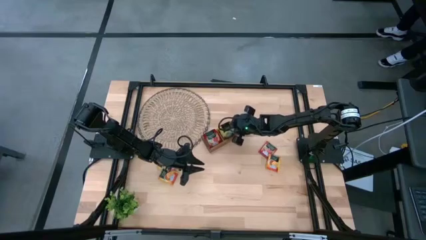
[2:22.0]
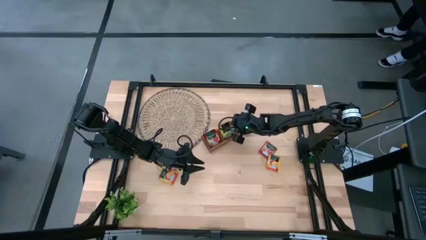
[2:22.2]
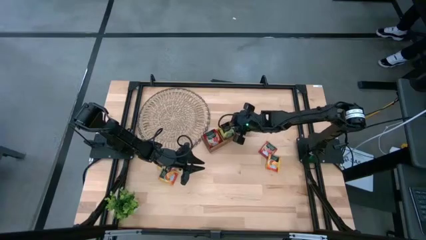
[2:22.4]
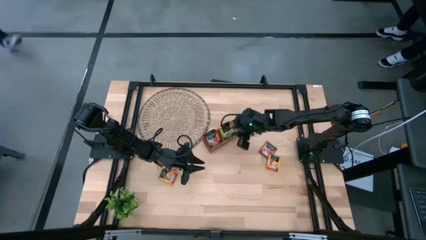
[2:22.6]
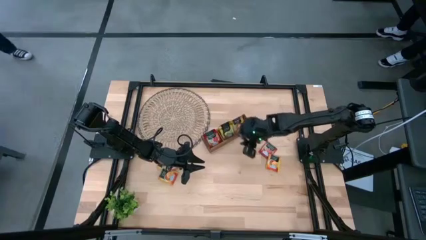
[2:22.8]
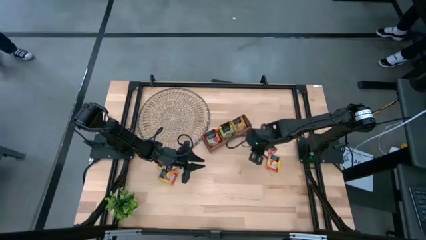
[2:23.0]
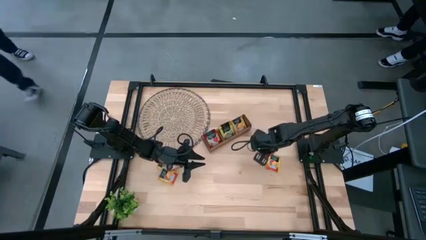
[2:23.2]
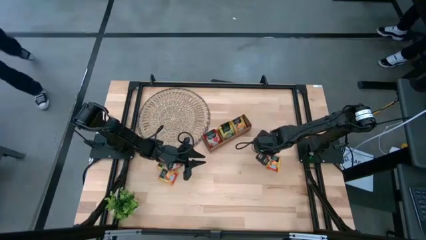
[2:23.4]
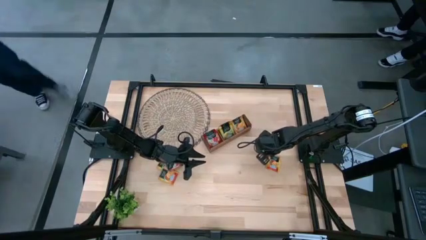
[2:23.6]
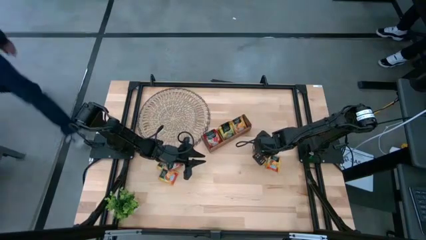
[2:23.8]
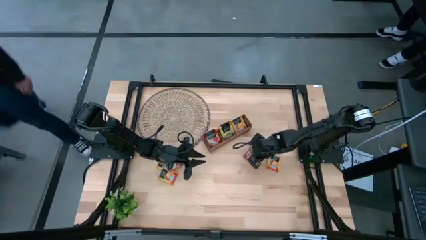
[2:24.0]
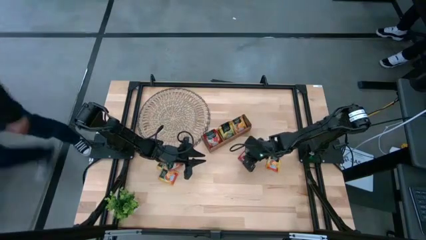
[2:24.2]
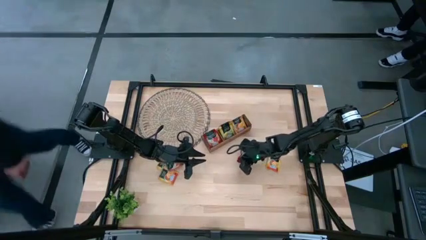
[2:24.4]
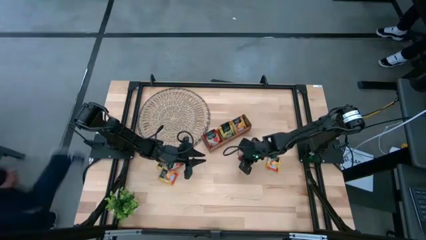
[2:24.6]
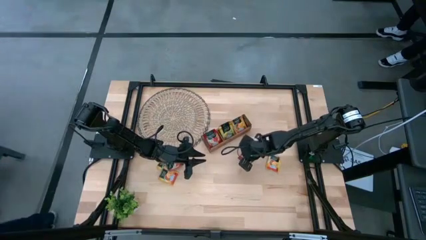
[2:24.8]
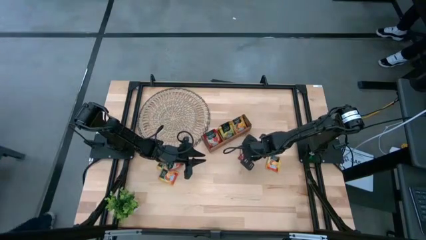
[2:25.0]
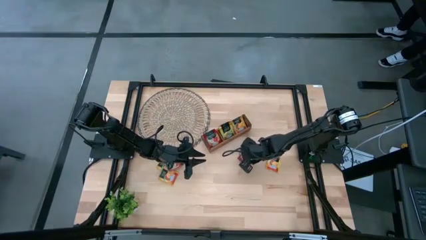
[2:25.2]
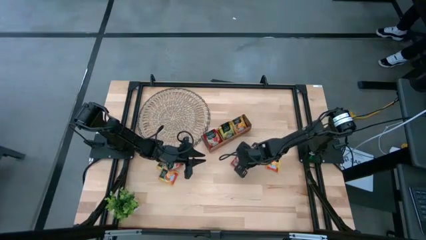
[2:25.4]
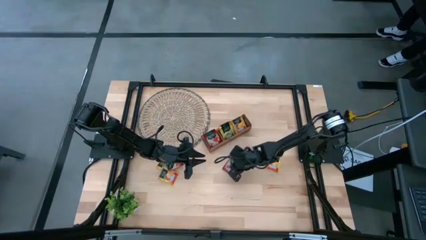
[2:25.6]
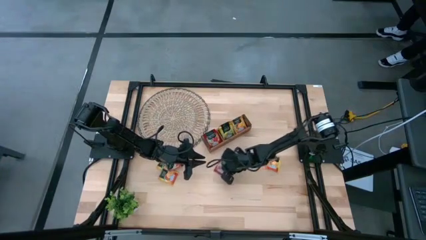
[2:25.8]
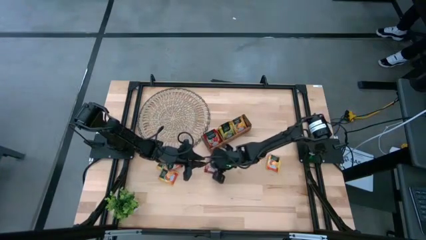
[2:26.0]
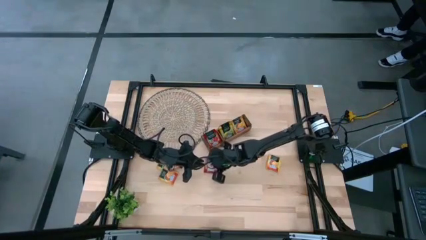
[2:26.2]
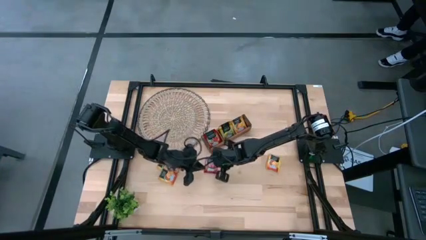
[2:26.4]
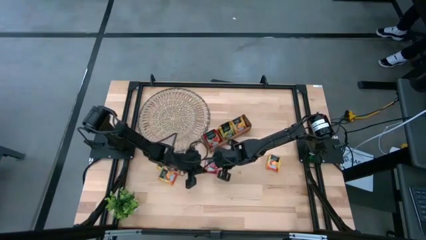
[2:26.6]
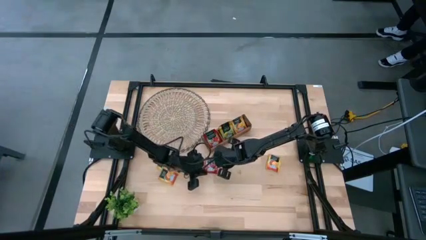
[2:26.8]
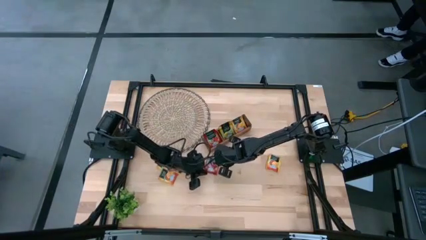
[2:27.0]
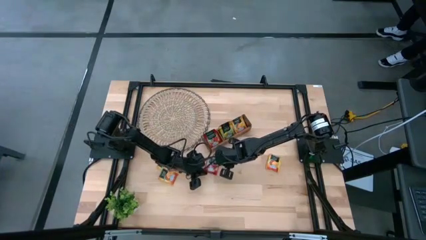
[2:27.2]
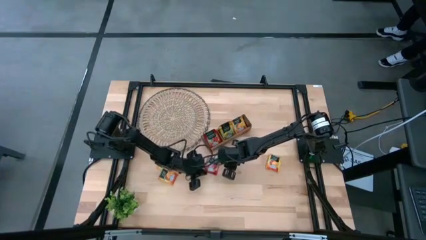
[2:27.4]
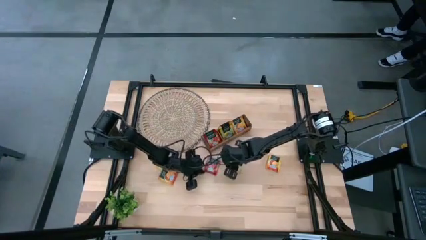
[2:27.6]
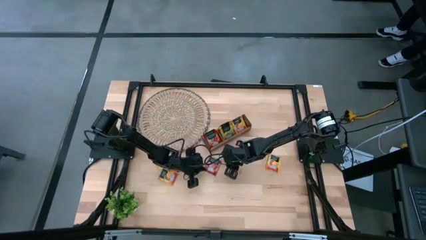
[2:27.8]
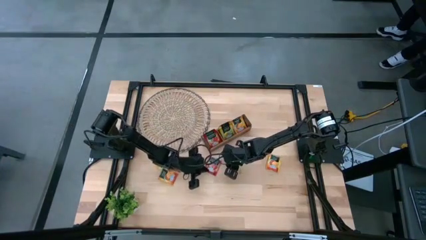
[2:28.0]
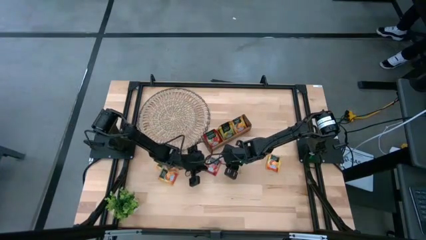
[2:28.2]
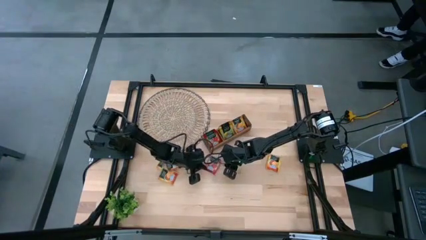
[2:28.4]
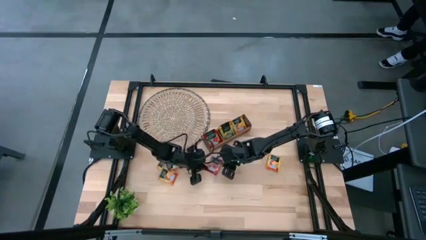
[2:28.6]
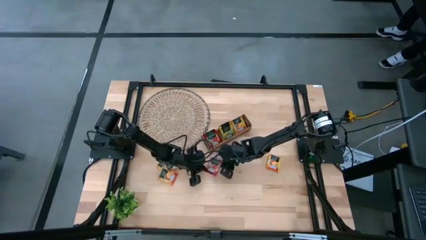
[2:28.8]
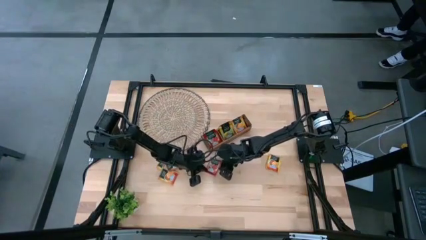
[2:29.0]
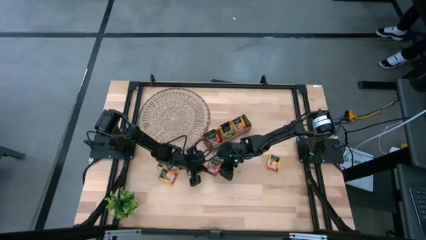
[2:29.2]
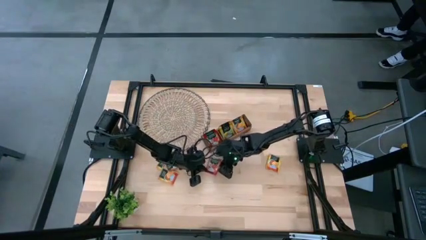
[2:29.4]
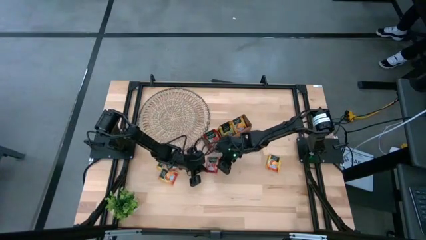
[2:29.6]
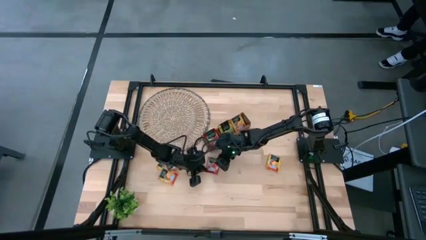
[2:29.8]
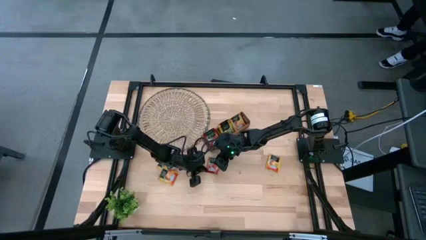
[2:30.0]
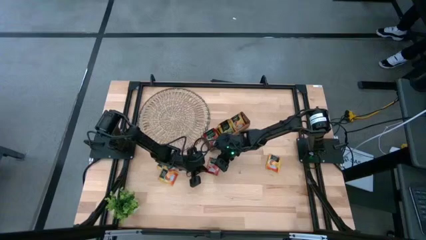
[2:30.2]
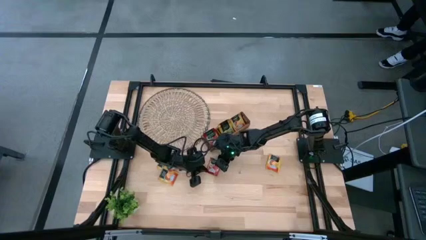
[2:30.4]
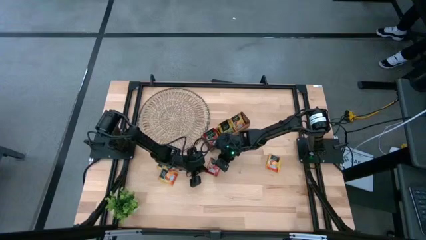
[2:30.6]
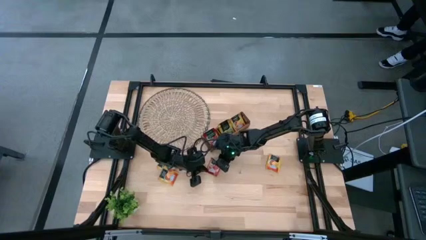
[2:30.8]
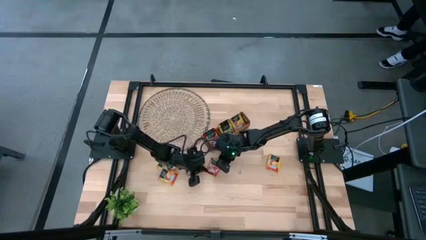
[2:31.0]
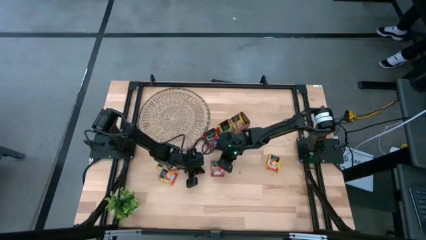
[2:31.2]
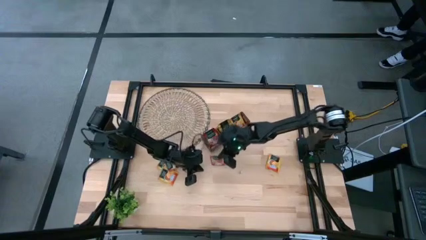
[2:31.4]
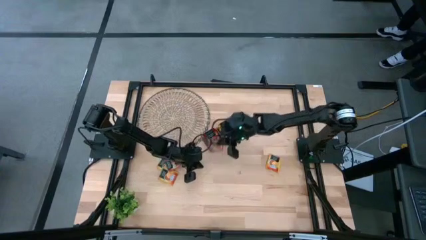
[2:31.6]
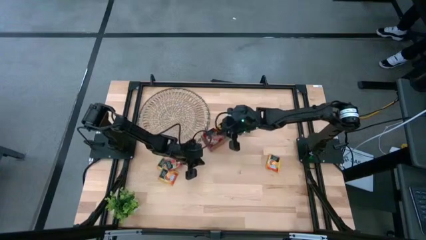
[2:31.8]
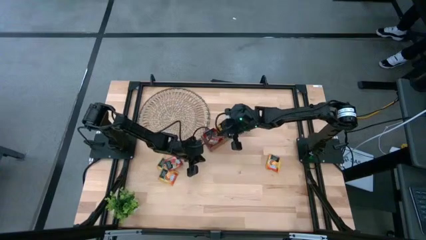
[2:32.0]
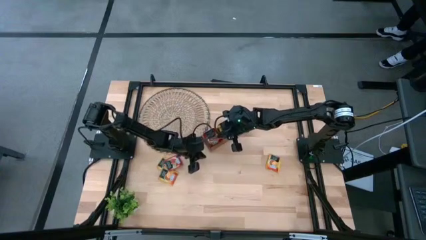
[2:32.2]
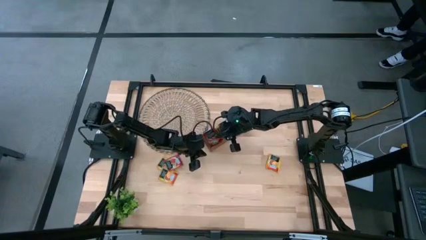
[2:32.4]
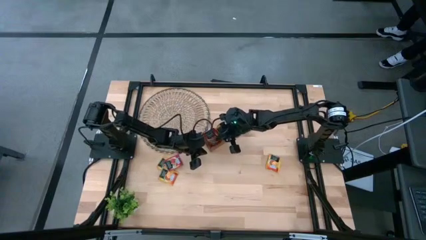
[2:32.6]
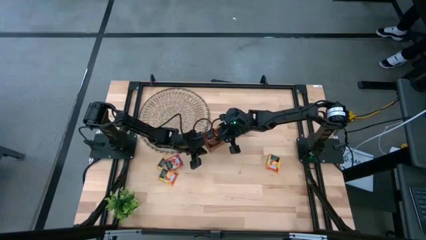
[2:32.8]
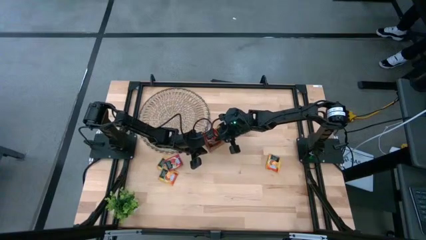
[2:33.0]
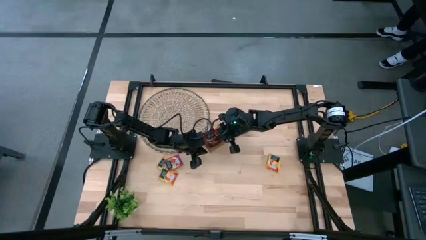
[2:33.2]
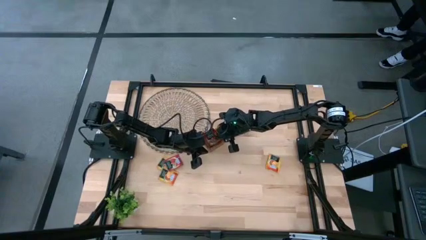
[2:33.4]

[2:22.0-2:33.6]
Task: Pick & Place Tea
Put the red tea bag into the left section of the wooden organizer

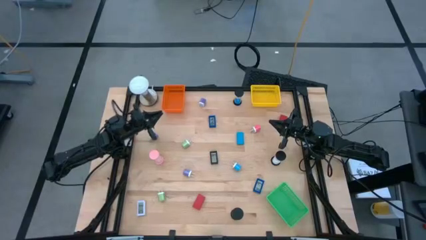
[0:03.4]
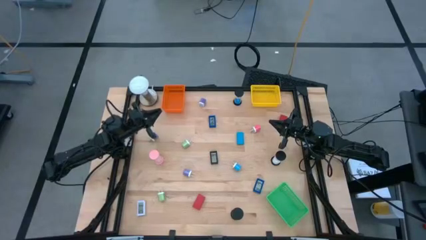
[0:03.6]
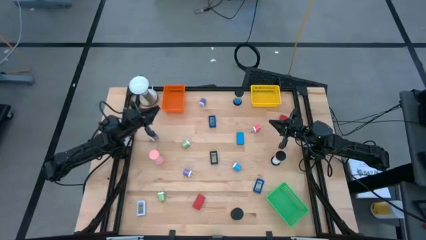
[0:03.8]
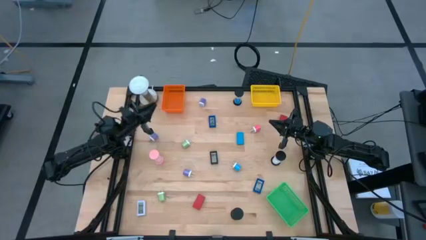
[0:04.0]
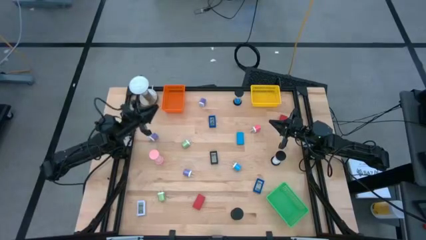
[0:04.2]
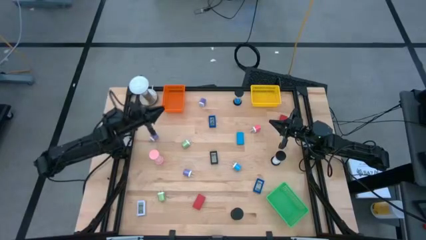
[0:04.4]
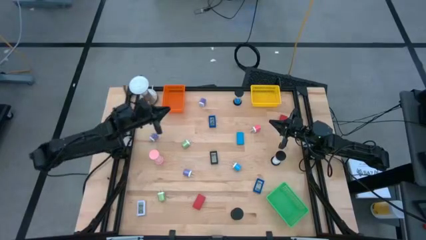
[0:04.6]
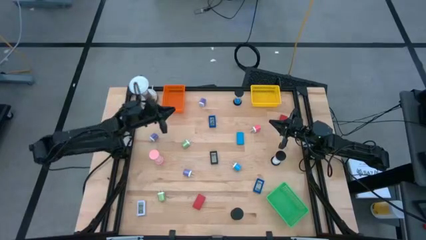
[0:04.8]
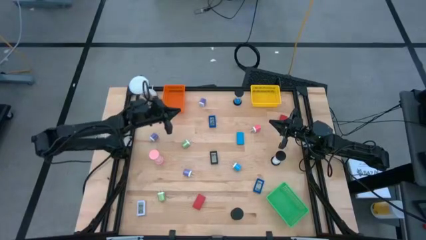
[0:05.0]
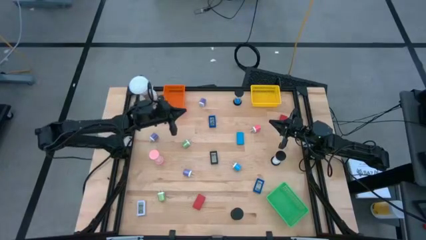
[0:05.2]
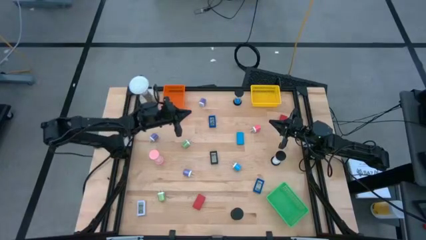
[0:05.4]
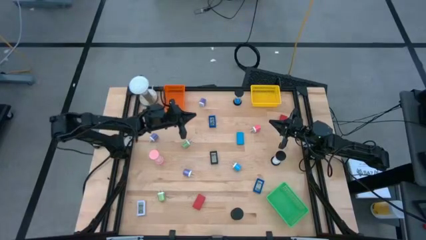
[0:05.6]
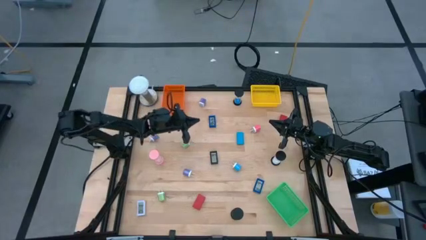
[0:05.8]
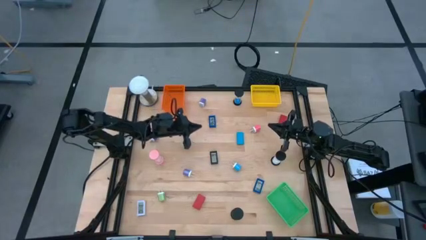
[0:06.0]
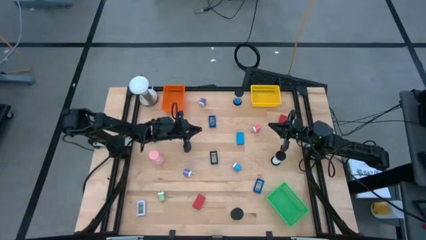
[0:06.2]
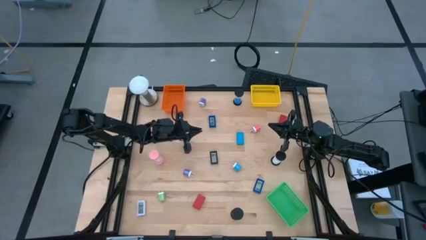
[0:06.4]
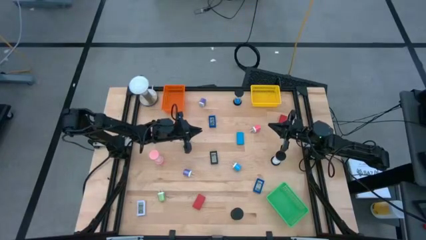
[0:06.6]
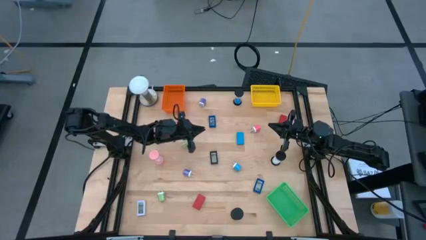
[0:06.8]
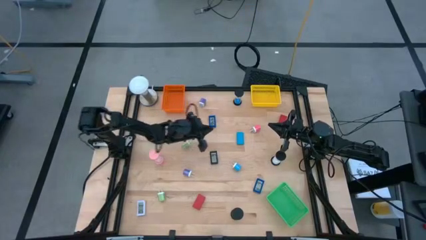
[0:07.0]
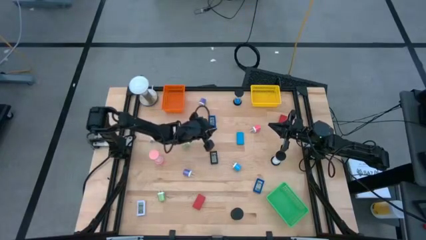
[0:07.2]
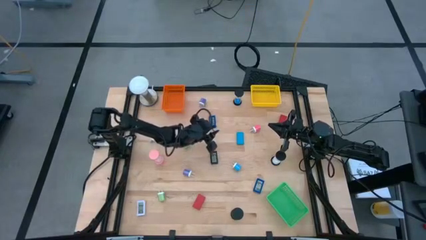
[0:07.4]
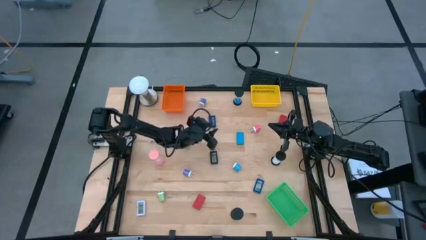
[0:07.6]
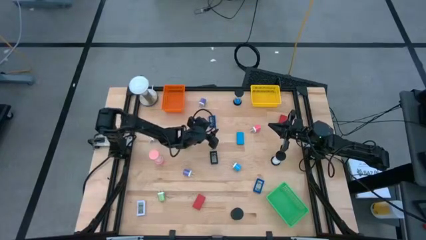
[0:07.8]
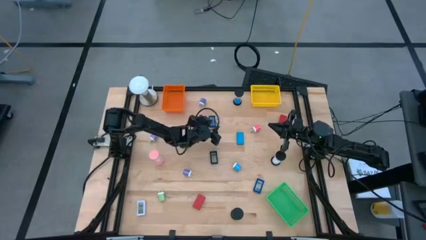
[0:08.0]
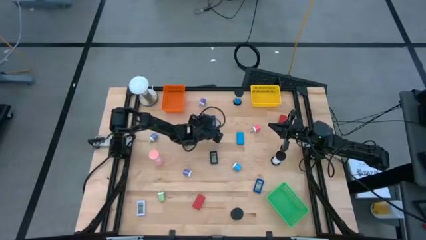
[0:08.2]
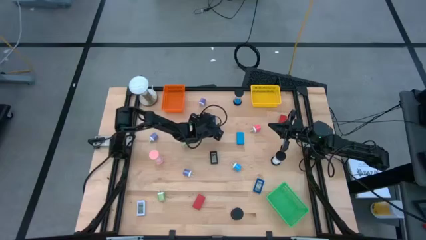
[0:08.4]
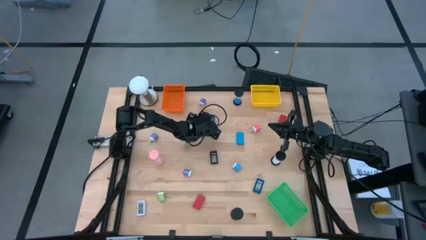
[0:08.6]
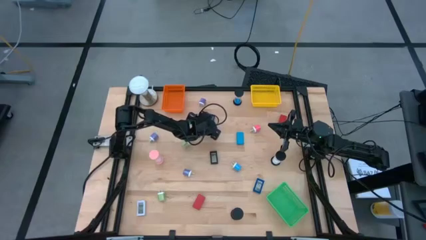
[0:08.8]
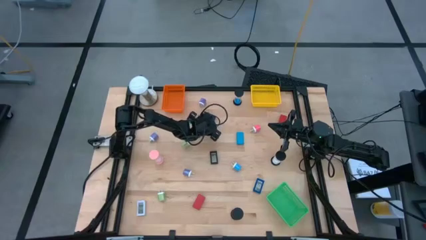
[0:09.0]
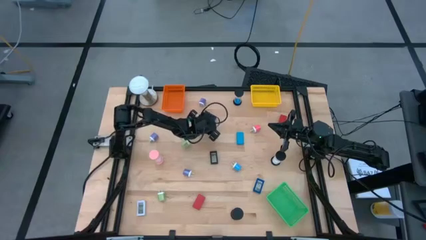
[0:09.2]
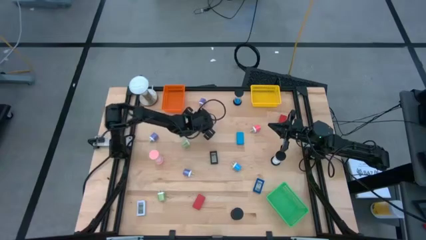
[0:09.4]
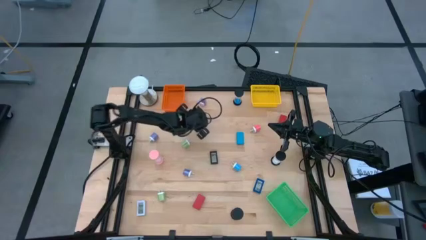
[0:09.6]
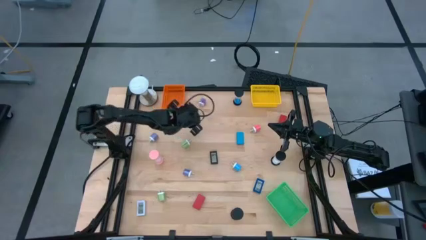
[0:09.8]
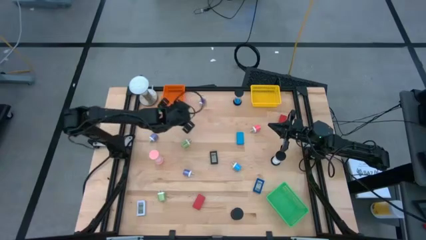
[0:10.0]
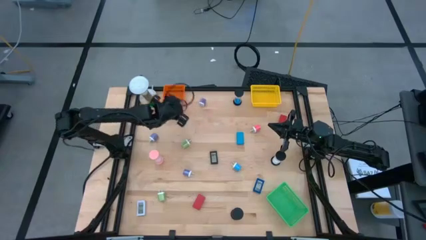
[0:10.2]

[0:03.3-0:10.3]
Task: Pick & Place Office items
Put the top blue digital clock into the orange bin
